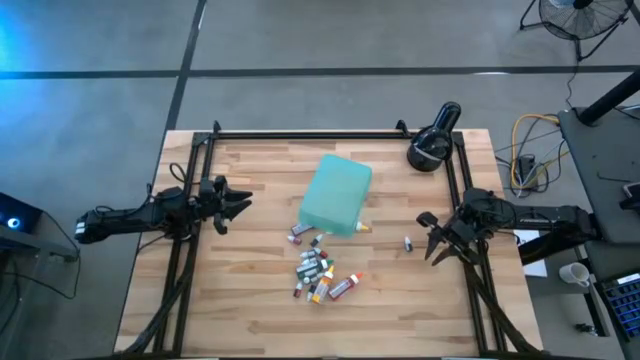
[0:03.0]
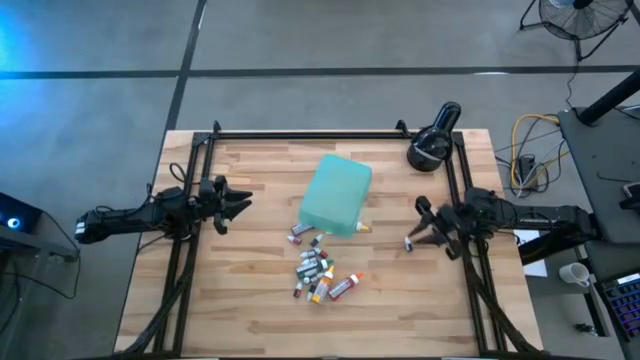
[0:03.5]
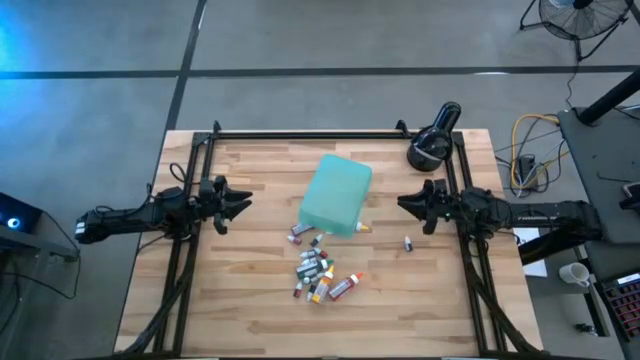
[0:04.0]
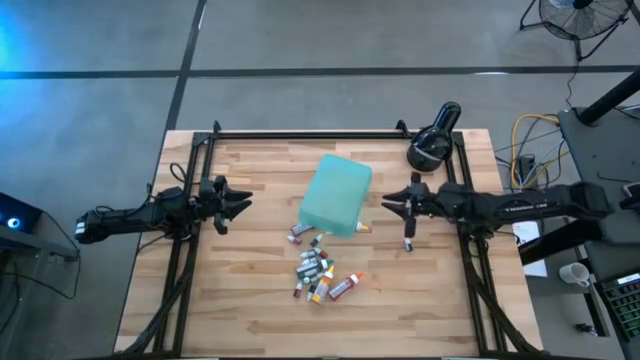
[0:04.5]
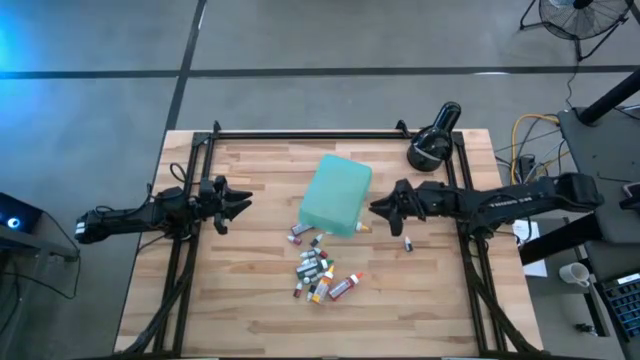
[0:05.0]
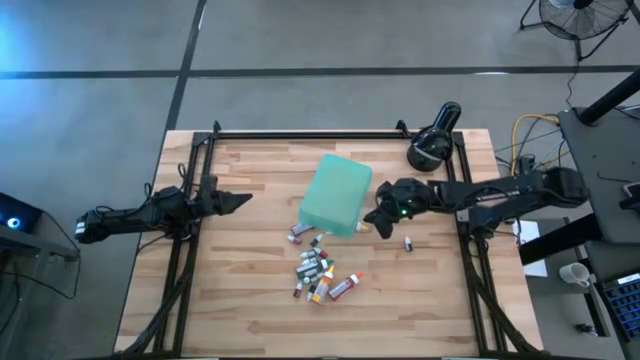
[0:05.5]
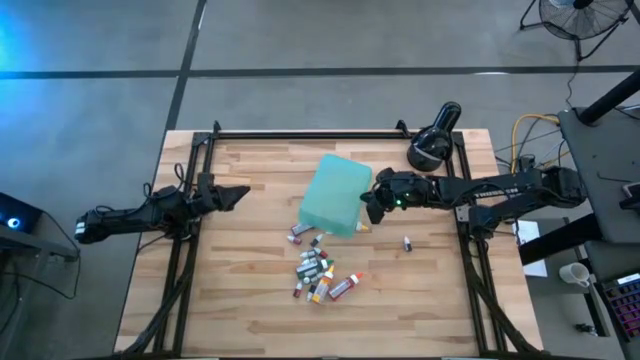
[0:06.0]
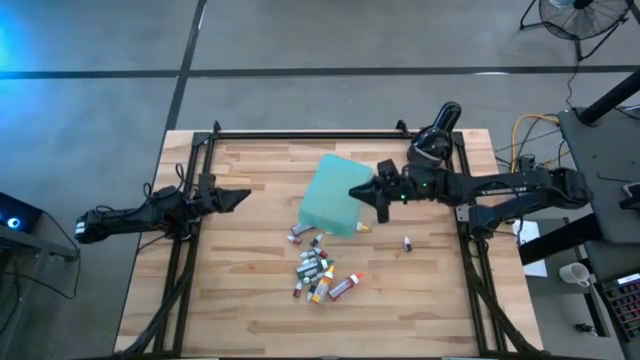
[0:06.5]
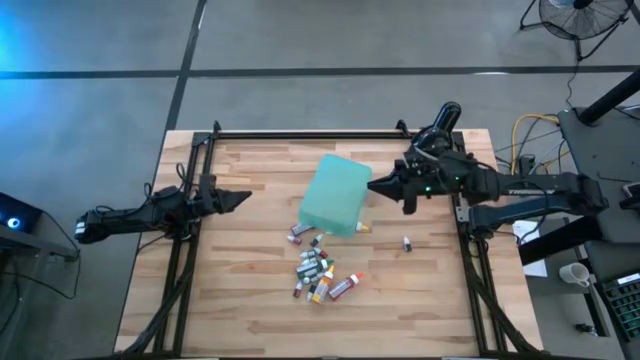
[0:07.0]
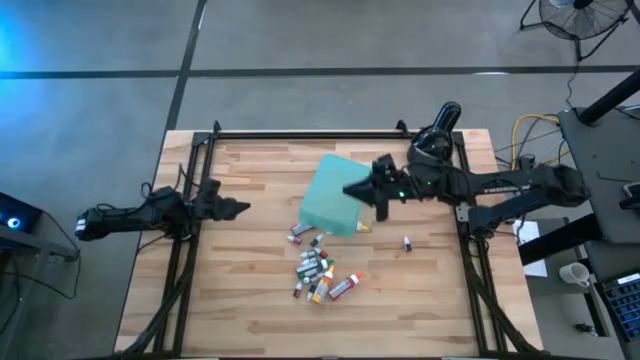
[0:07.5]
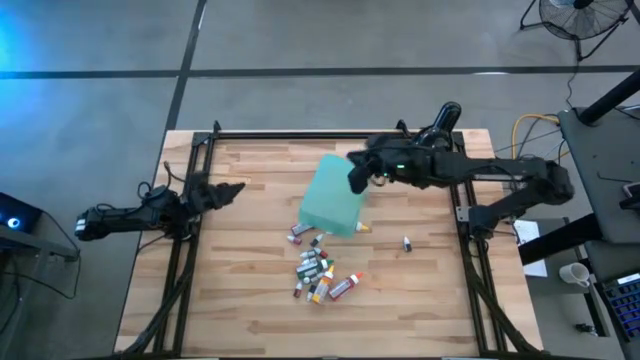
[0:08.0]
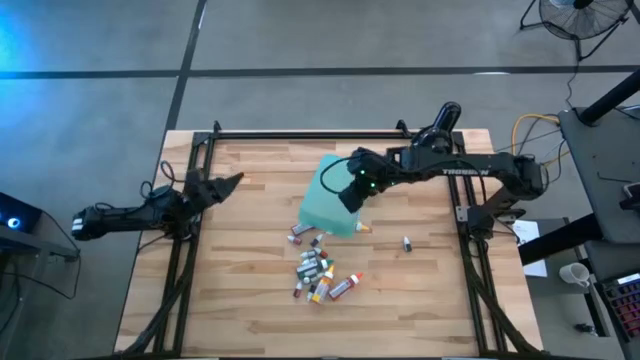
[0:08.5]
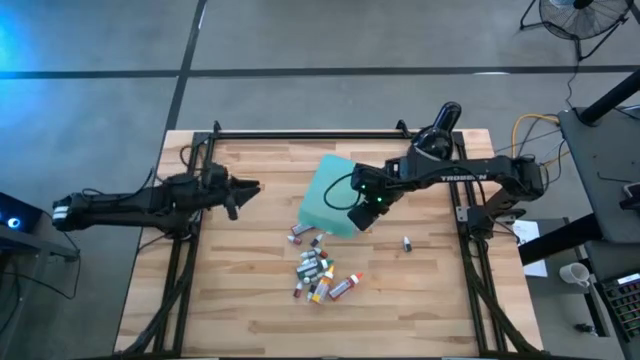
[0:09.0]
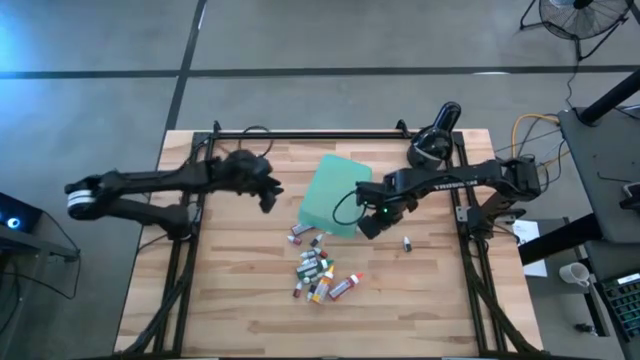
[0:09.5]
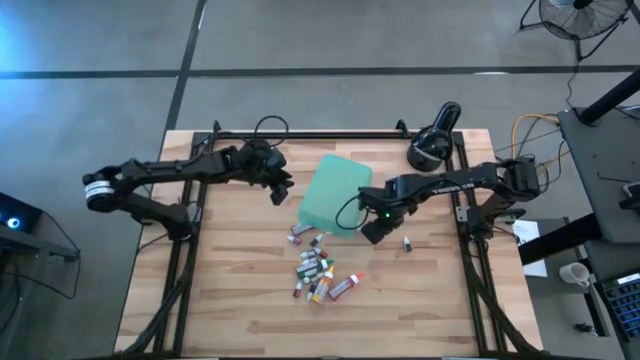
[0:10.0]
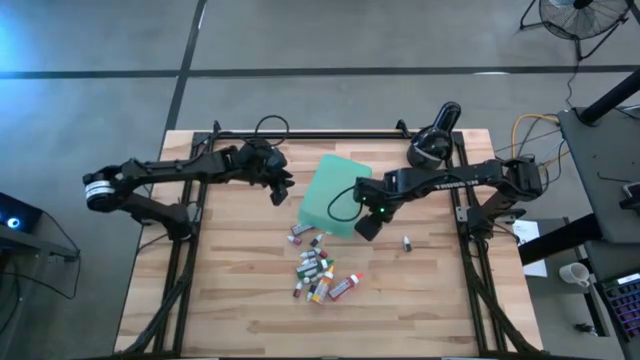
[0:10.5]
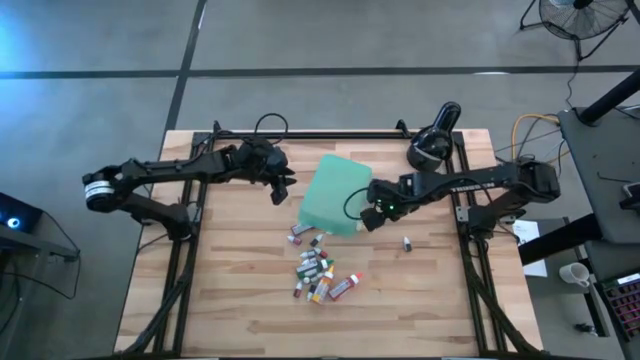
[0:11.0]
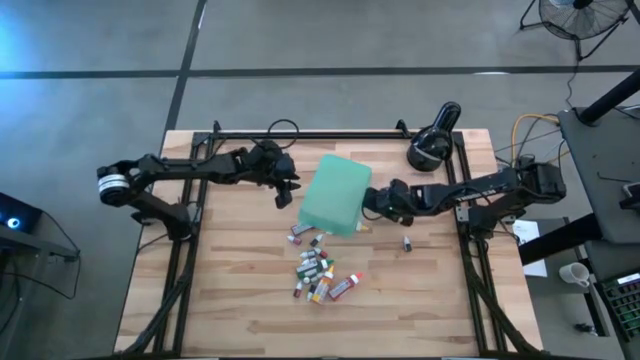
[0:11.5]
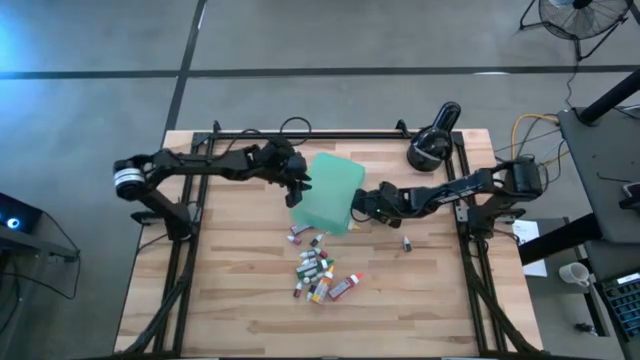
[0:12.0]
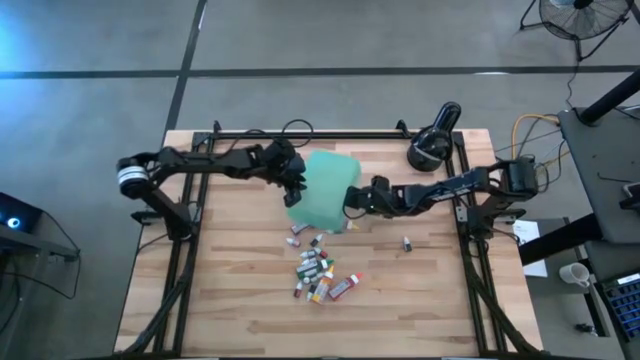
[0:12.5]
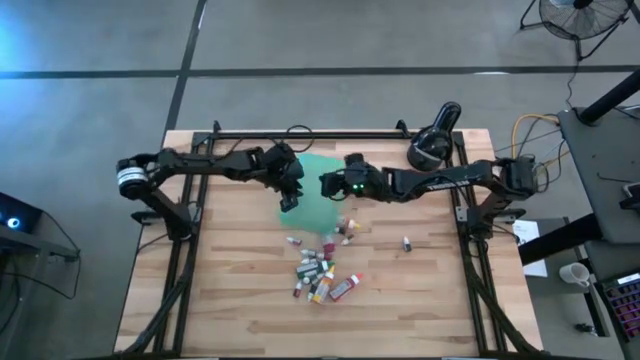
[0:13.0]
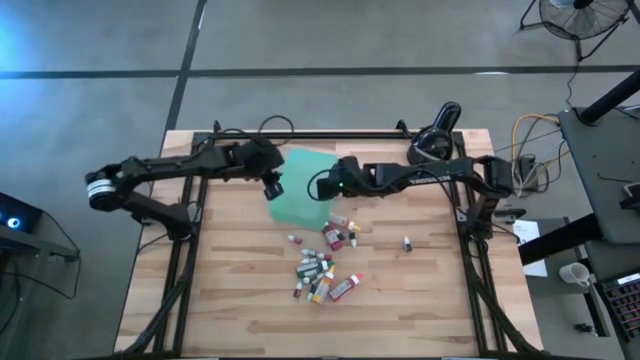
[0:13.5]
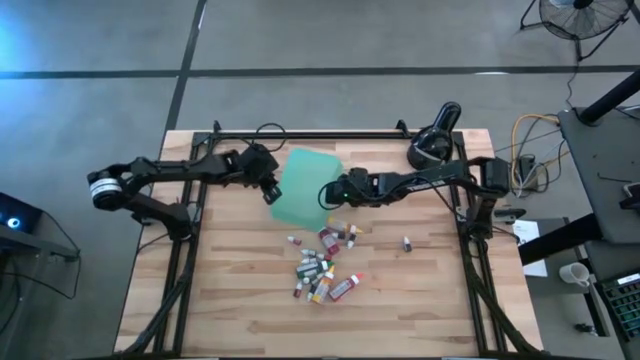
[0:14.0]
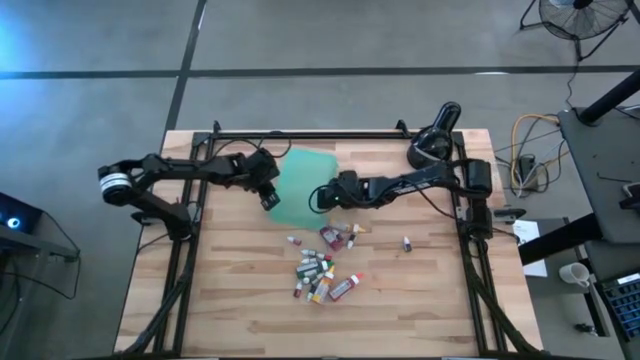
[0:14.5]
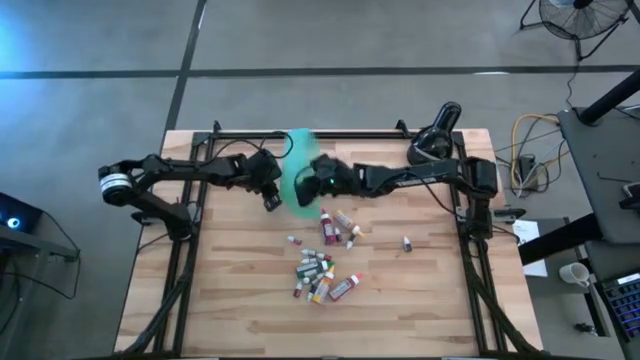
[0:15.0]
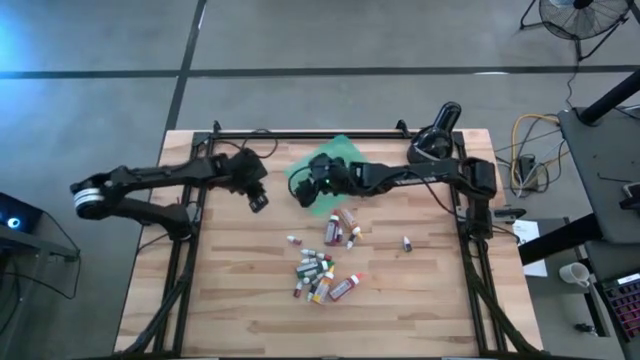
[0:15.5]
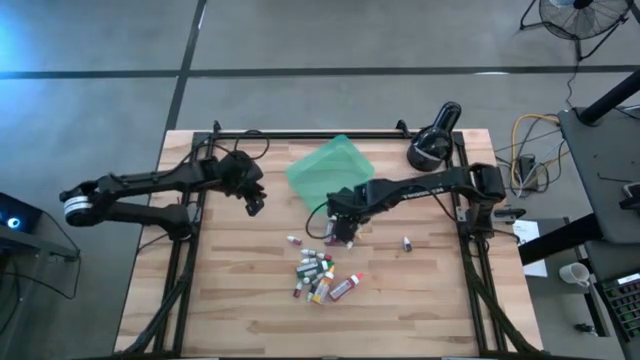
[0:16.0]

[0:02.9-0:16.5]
Task: Pick & Place food coloring
Prepare the green bin

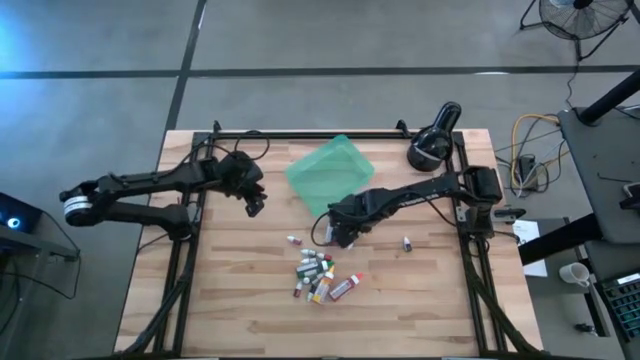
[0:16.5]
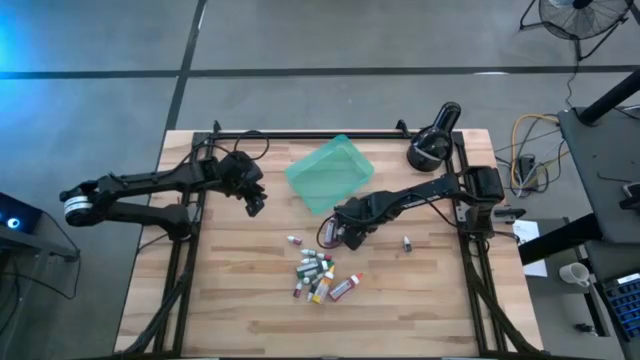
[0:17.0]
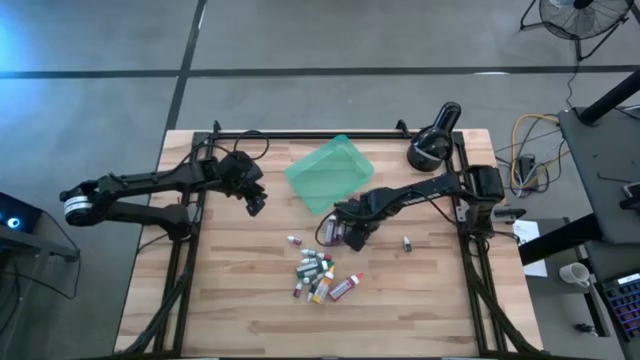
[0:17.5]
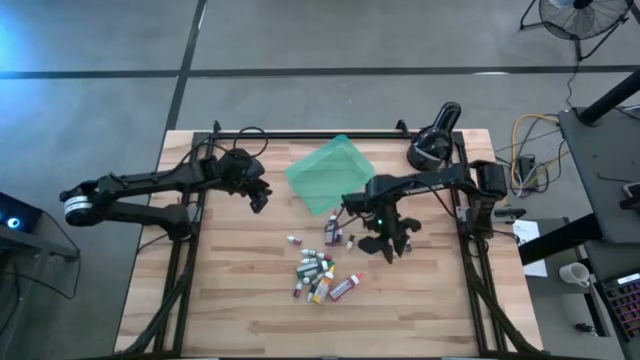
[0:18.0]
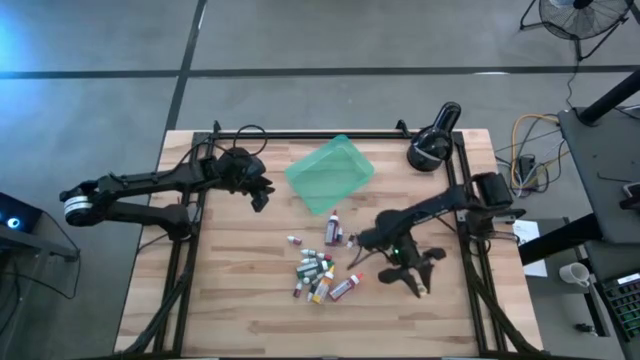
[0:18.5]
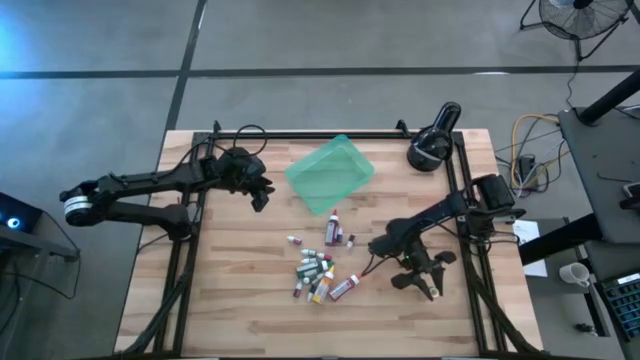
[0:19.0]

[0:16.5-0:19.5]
Adjust the yellow big food coloring bottle

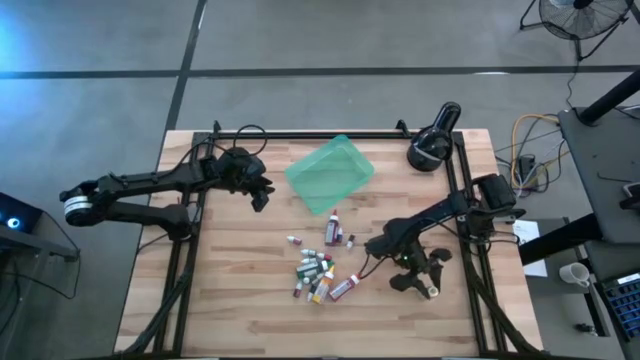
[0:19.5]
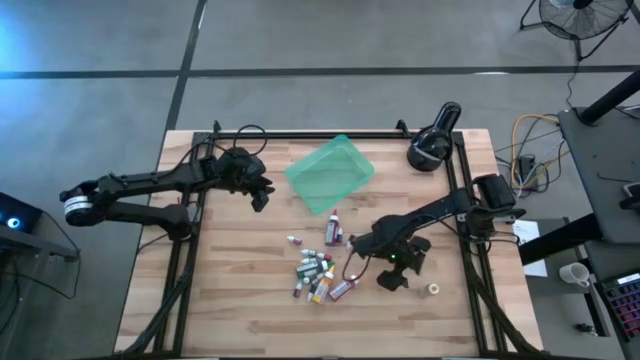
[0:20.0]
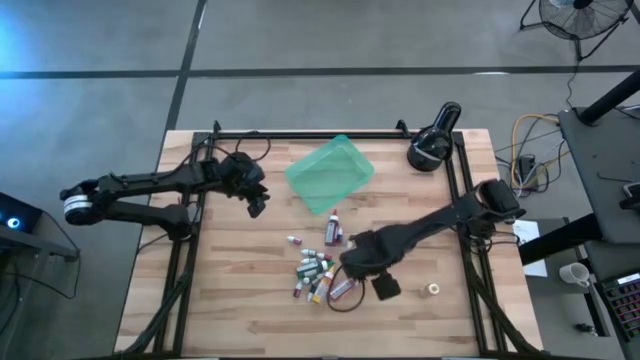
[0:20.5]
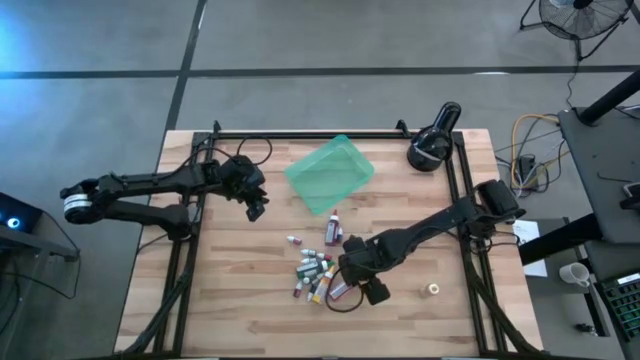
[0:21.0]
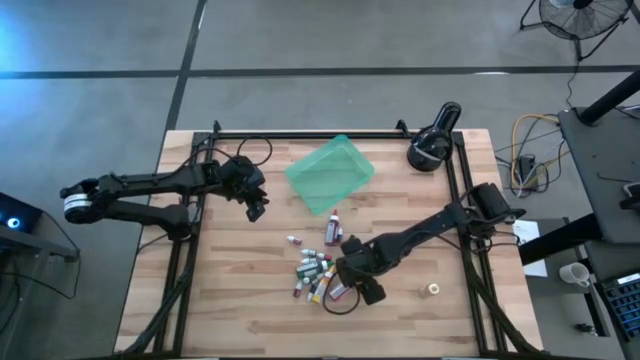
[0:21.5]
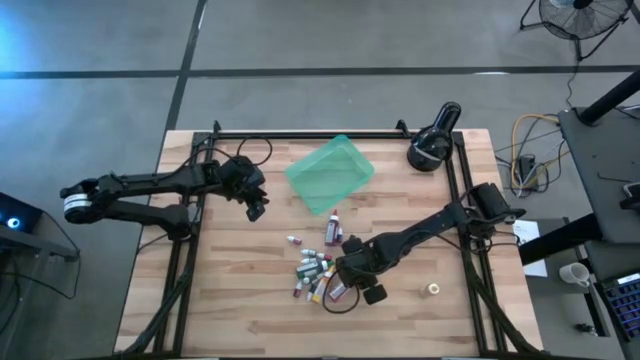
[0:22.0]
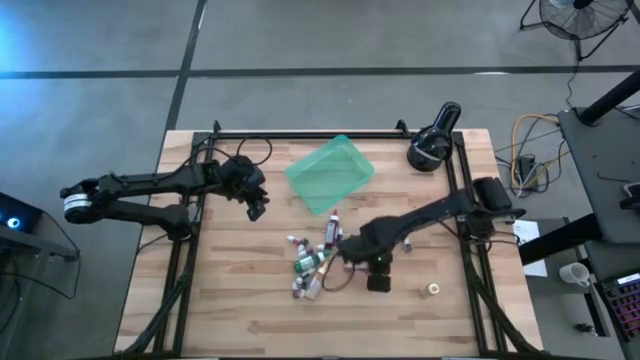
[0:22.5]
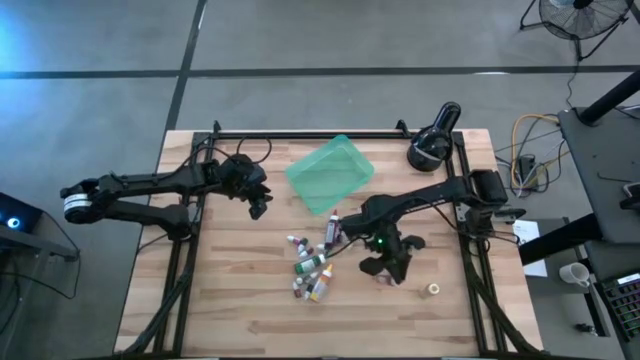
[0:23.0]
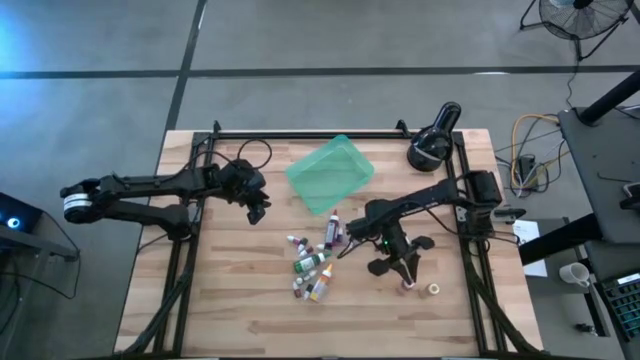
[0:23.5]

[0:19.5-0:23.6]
Adjust the red big food coloring bottle
